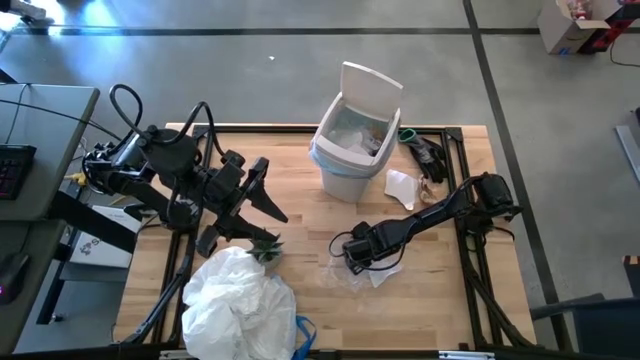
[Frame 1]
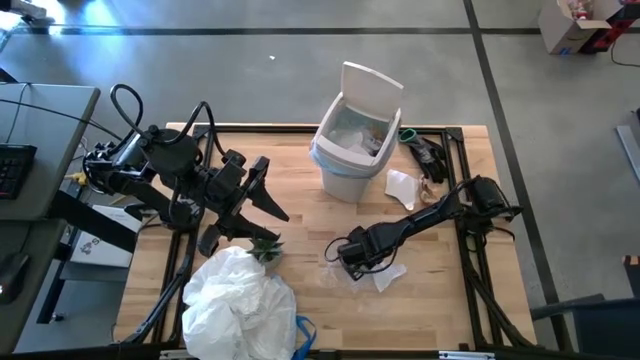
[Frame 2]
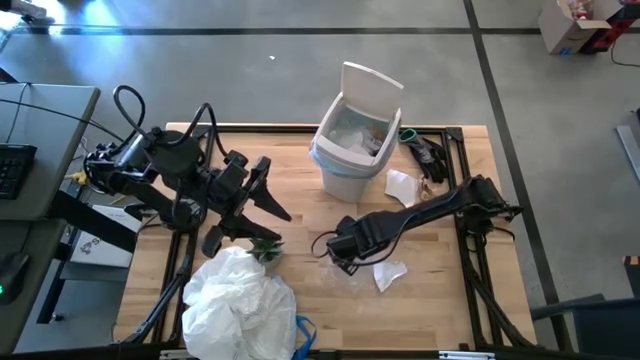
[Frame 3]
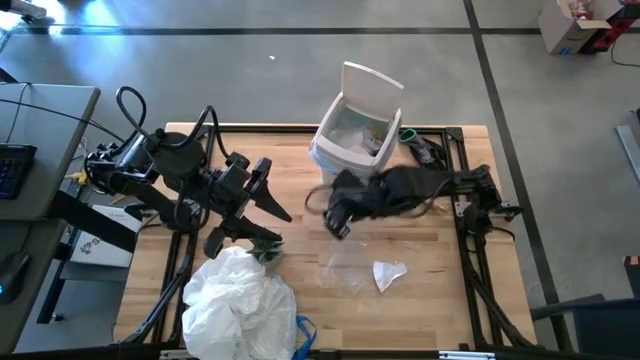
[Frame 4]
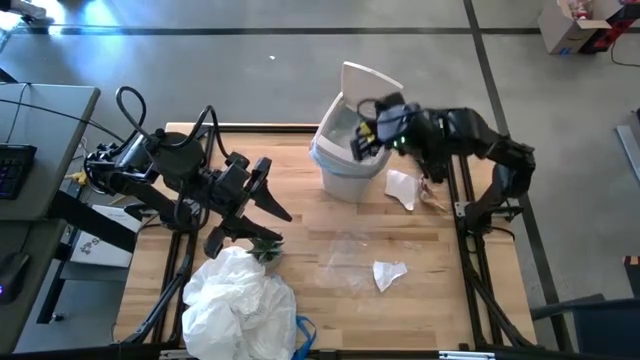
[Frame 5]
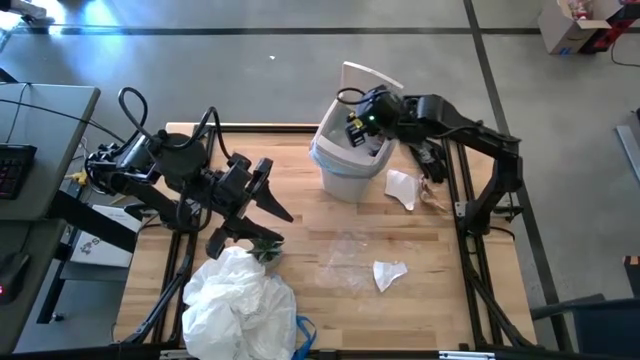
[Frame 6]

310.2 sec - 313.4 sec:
Task: place trash/remove bag and relplace
Put the transparent plastic into the trash bin

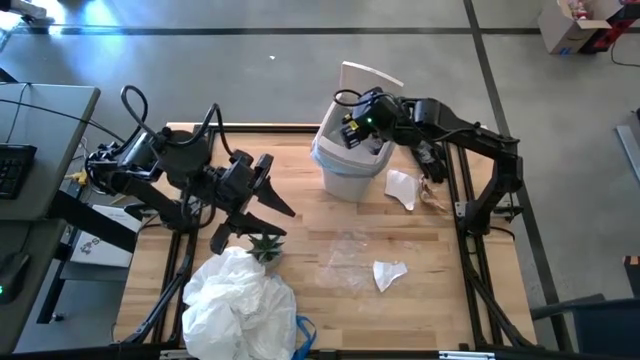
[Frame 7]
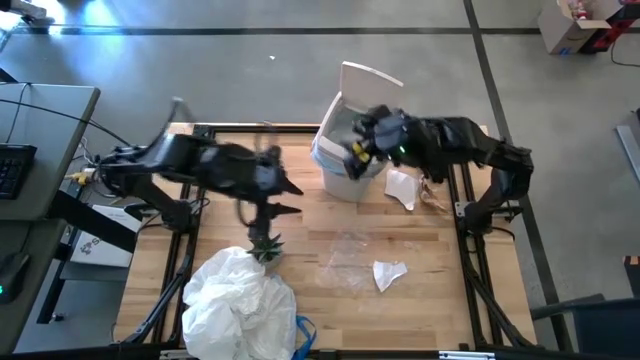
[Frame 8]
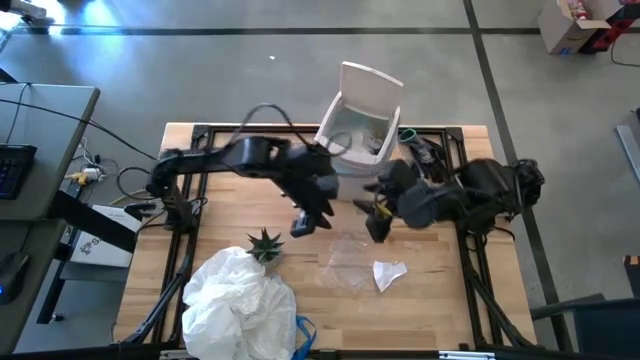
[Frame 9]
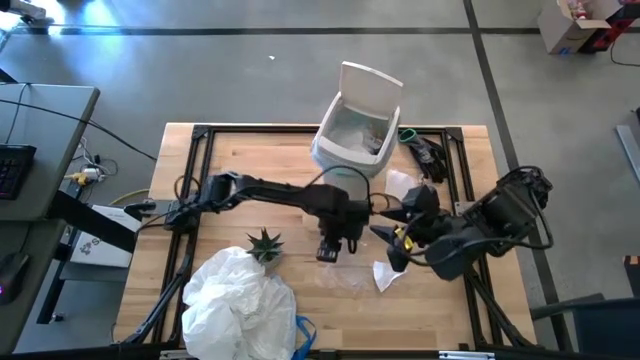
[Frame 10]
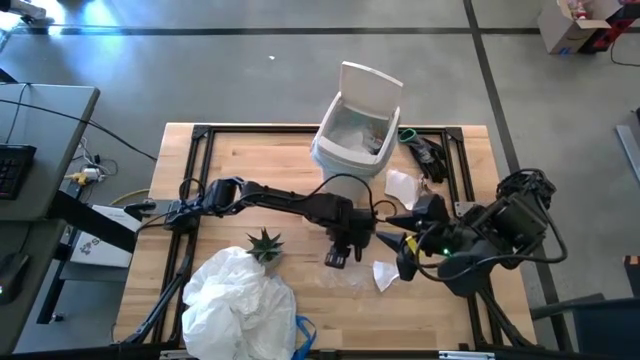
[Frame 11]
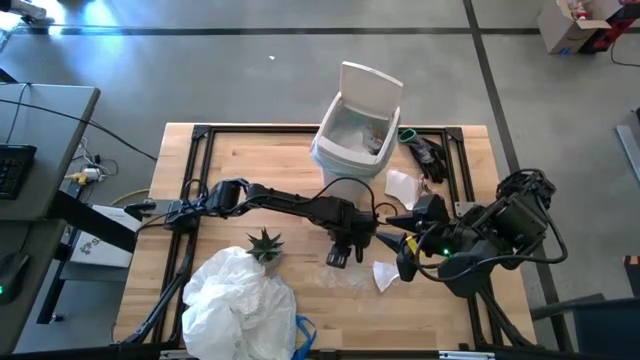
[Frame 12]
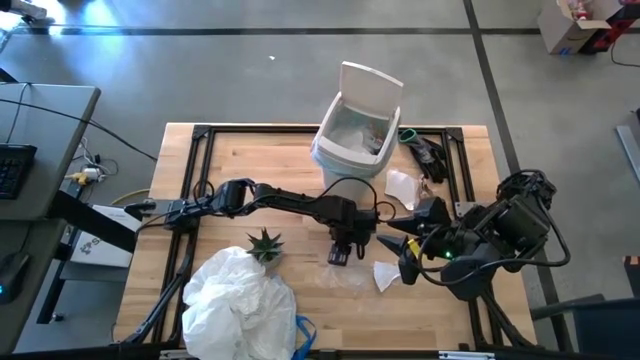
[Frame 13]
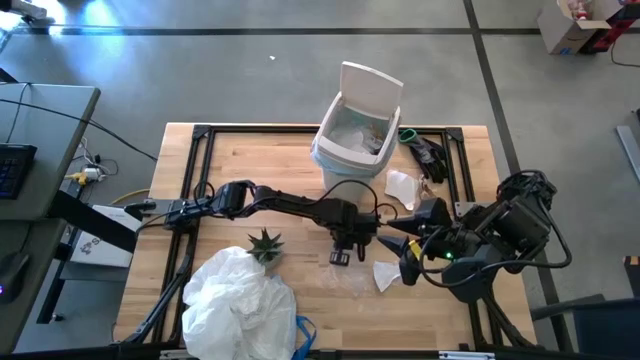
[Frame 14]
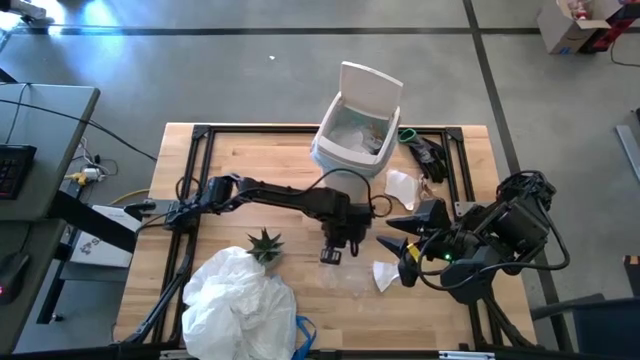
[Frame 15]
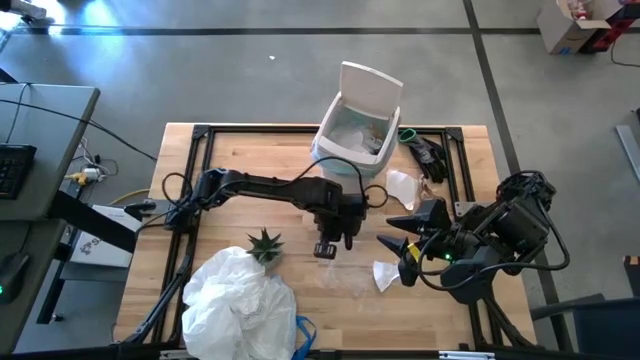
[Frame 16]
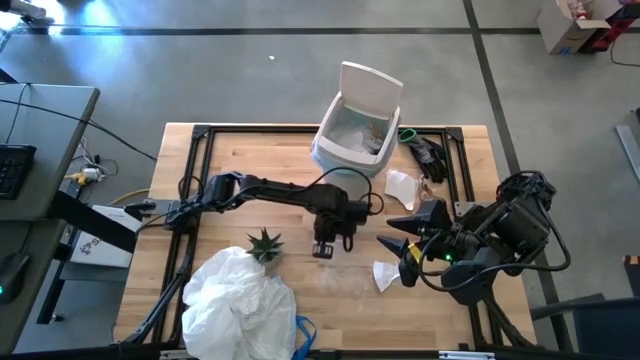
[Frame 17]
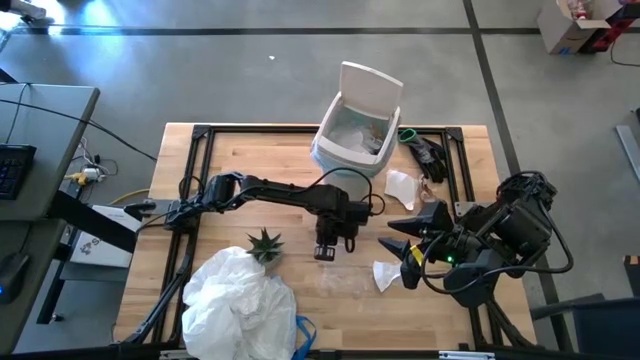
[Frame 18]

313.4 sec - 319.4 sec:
Put the transparent plastic into the trash bin

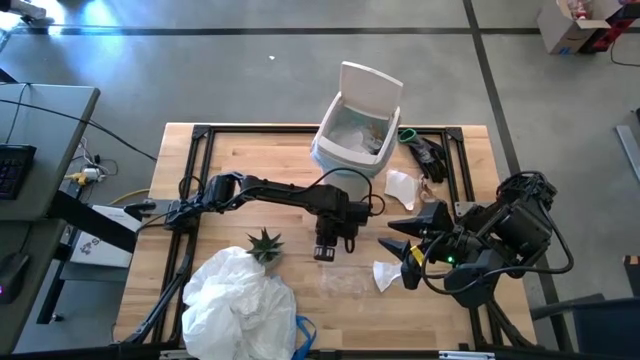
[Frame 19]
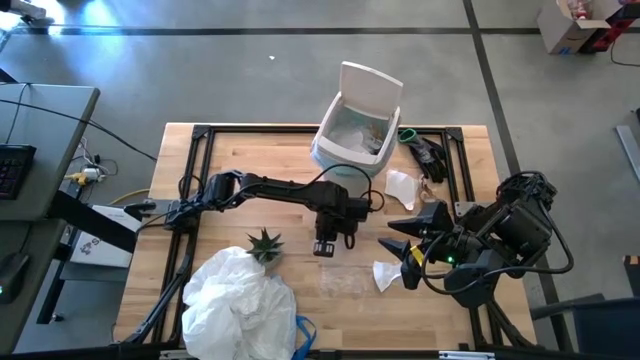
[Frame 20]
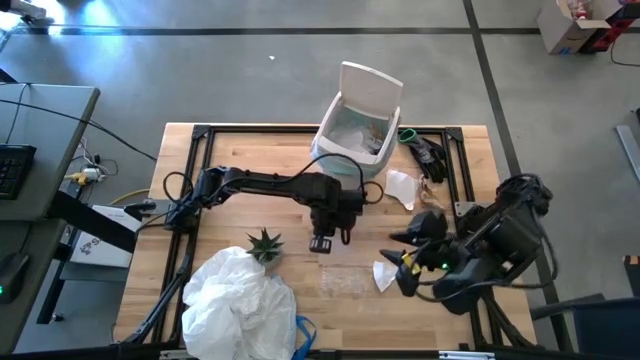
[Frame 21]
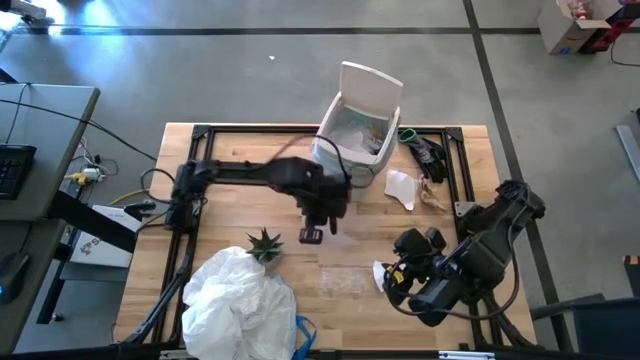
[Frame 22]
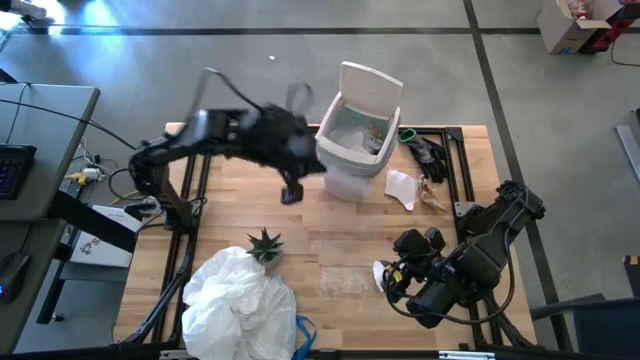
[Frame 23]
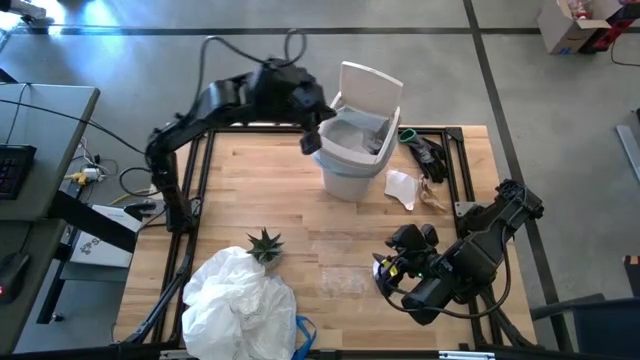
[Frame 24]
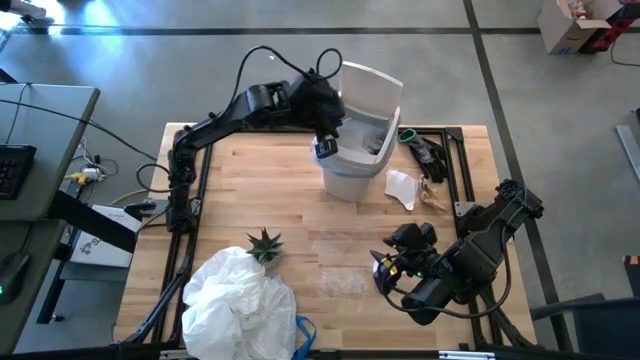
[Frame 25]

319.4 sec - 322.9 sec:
Put the transparent plastic into the trash bin

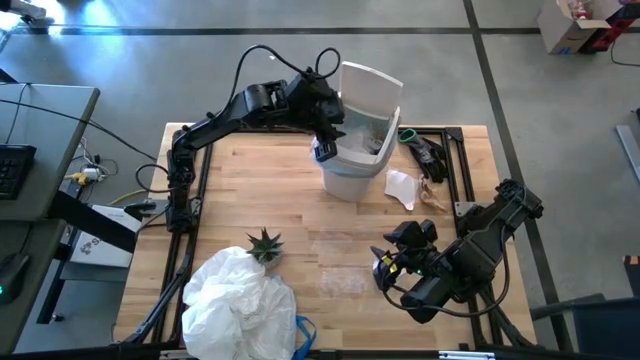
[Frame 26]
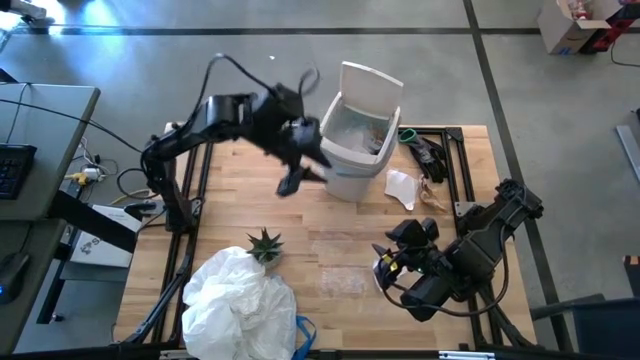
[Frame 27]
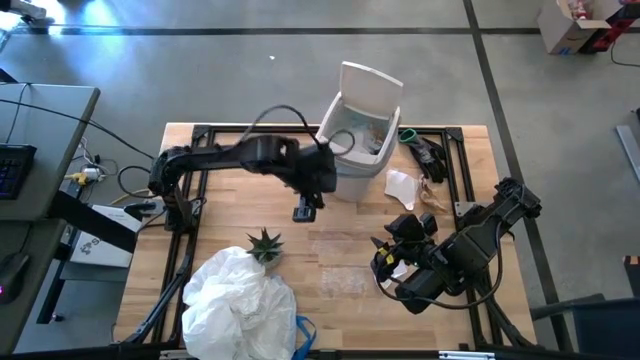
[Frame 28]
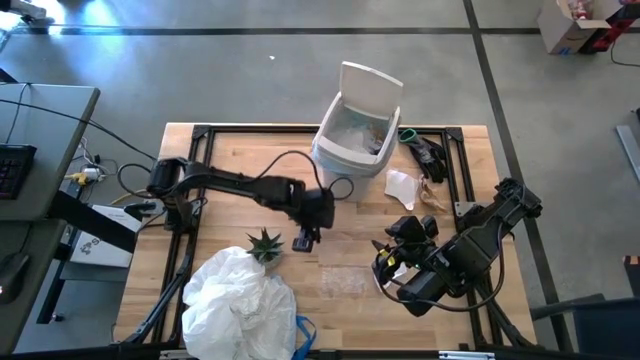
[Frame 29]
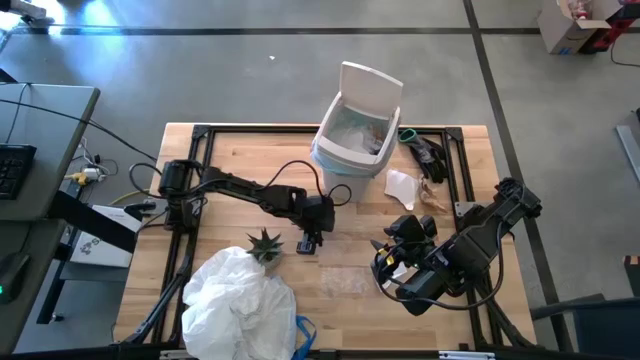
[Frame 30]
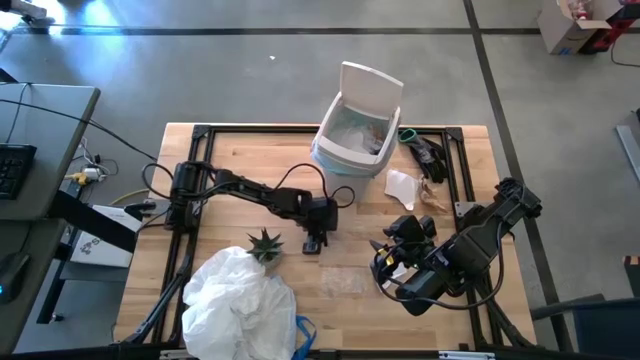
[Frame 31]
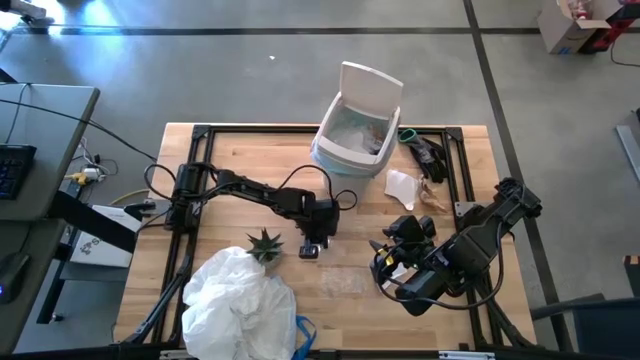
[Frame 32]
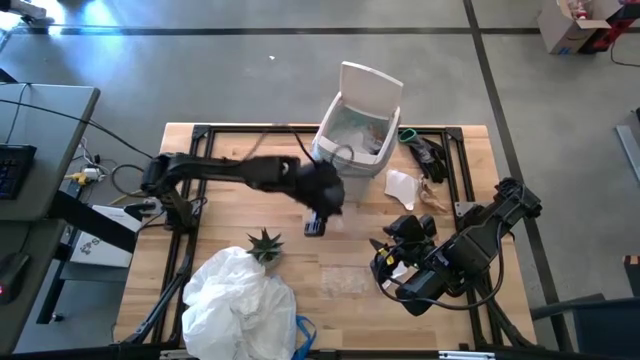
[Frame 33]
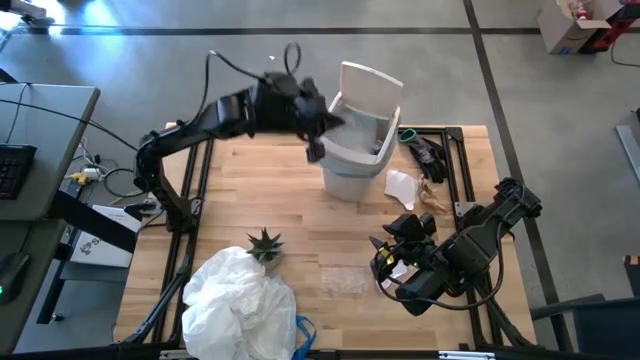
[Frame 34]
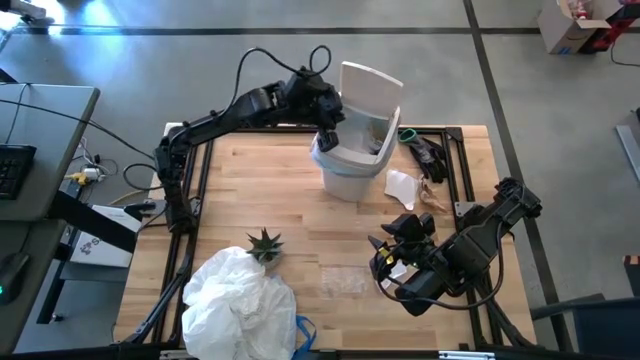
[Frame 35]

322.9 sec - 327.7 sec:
Put the transparent plastic into the trash bin

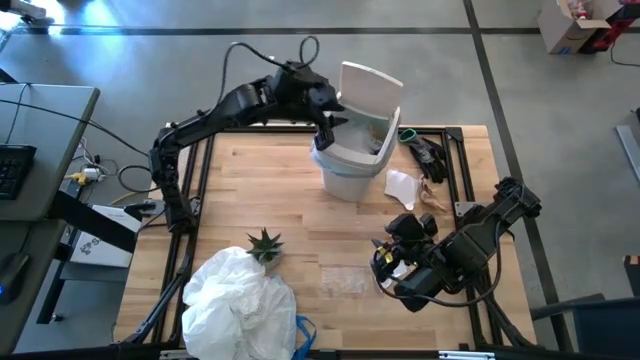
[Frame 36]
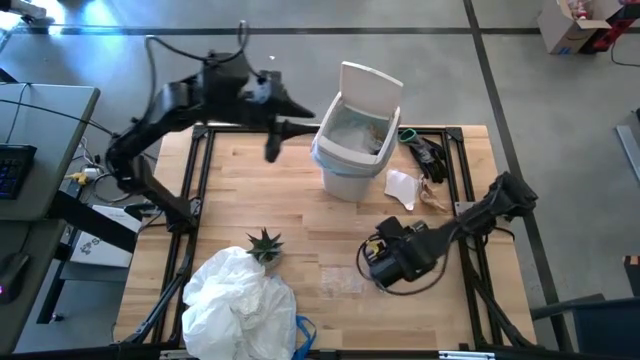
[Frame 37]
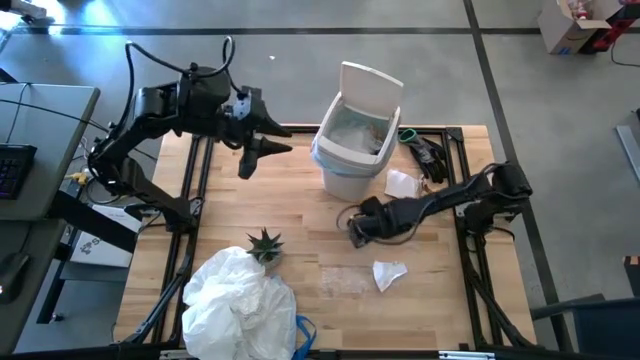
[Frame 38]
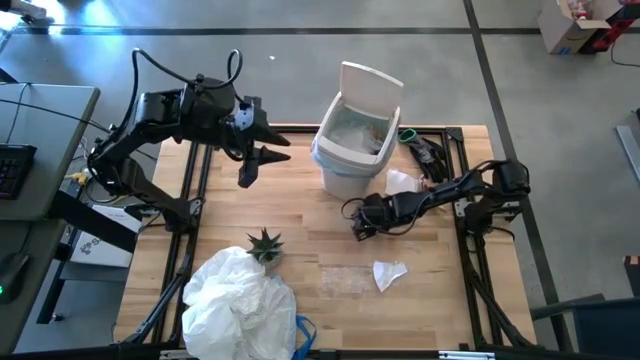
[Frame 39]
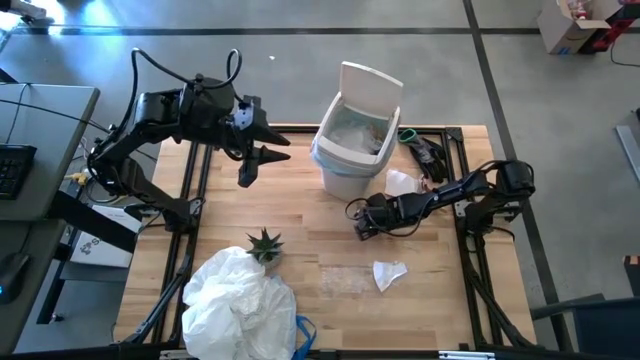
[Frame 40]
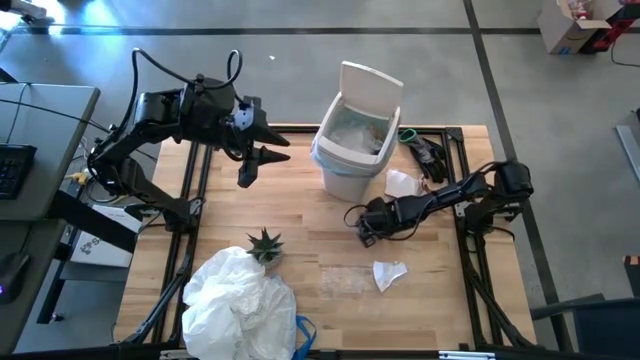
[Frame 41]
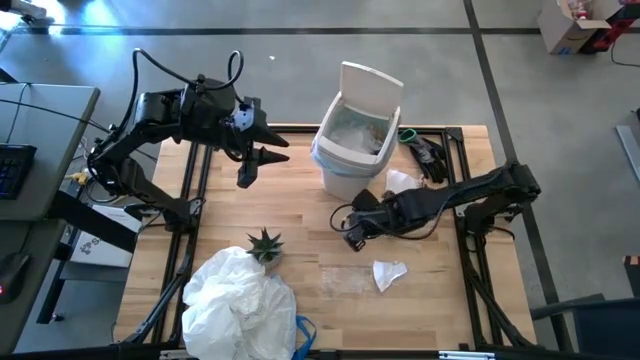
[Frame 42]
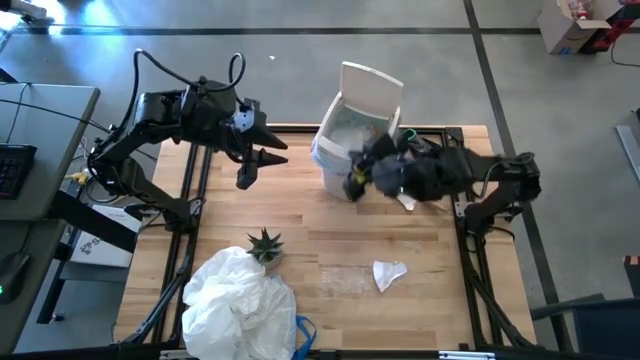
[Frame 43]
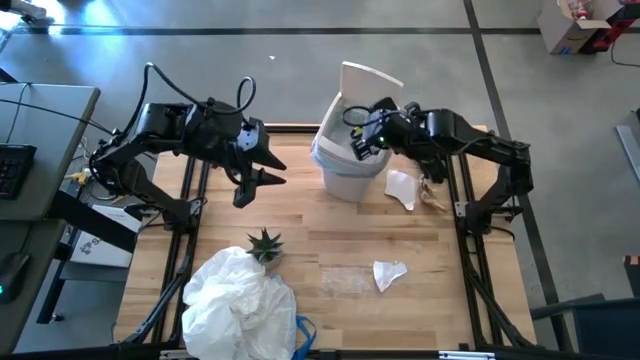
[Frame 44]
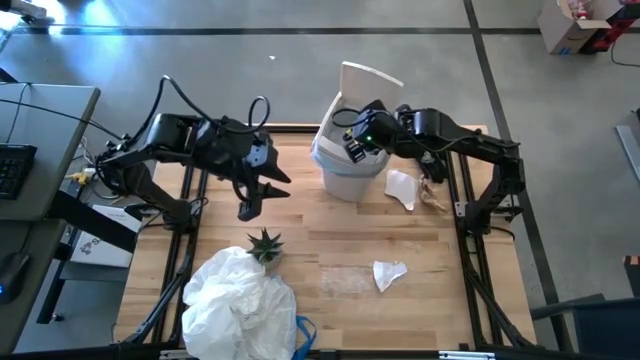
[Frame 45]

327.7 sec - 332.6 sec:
Put the transparent plastic into the trash bin
